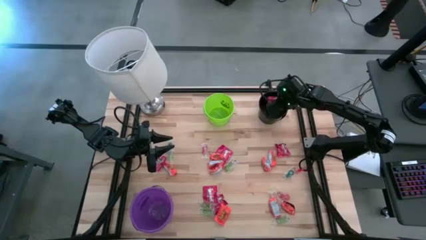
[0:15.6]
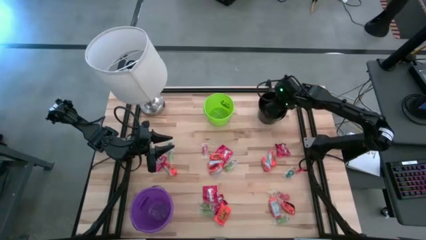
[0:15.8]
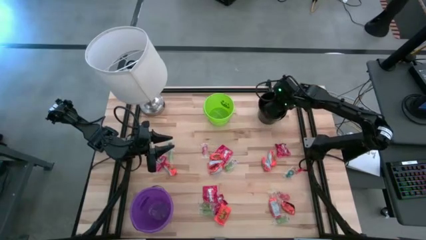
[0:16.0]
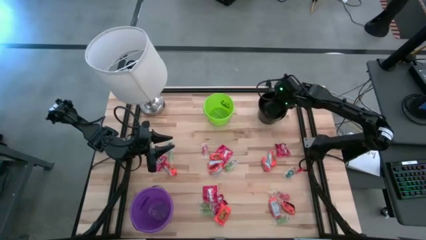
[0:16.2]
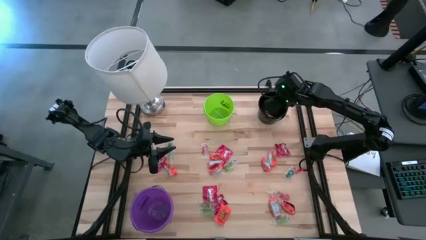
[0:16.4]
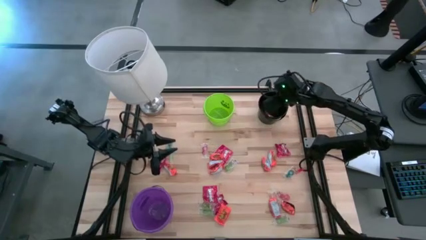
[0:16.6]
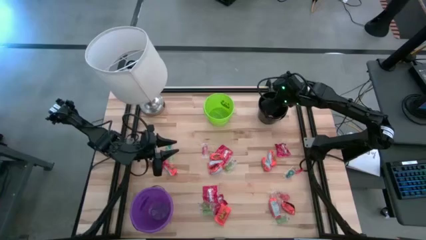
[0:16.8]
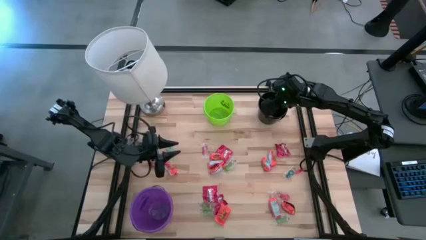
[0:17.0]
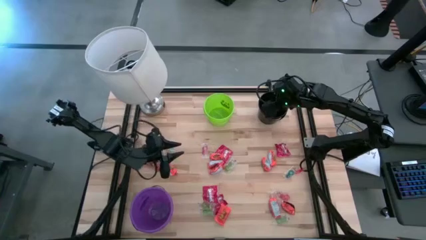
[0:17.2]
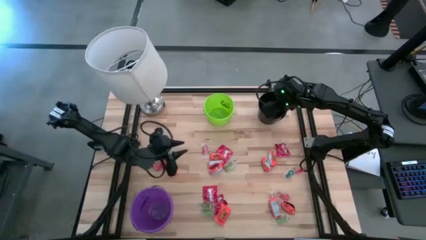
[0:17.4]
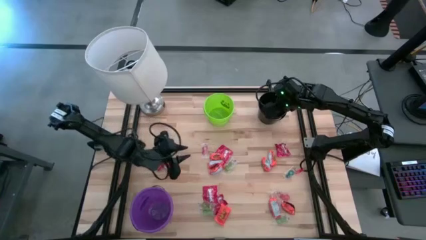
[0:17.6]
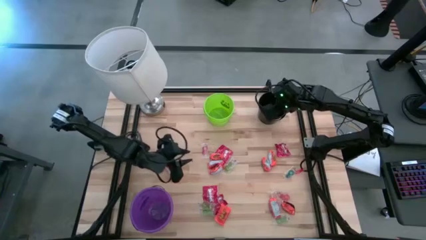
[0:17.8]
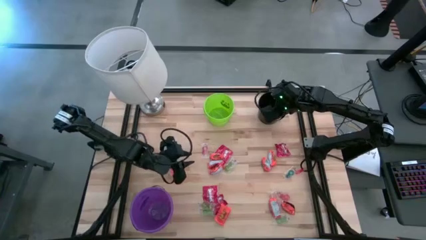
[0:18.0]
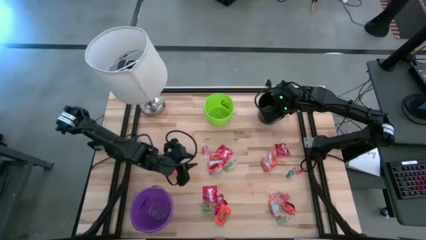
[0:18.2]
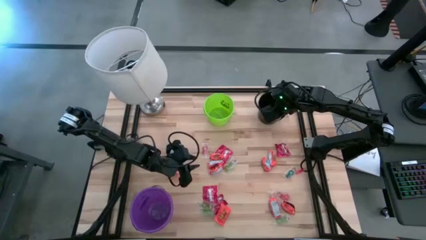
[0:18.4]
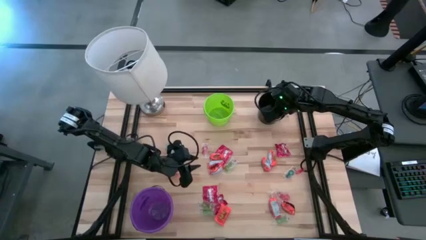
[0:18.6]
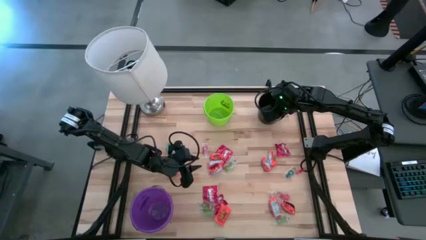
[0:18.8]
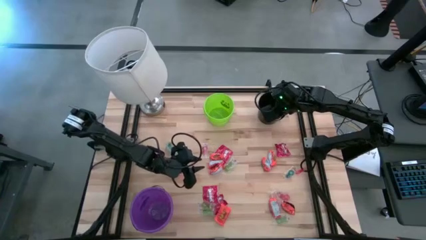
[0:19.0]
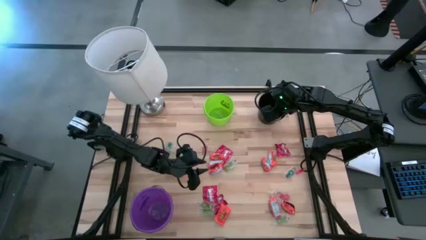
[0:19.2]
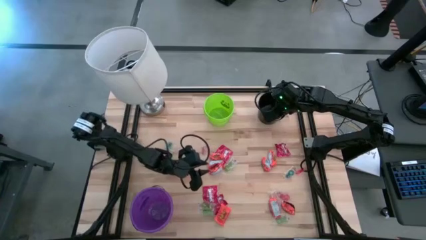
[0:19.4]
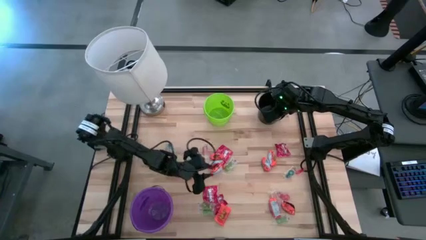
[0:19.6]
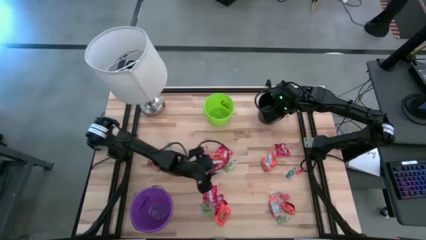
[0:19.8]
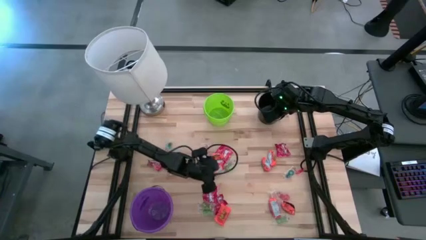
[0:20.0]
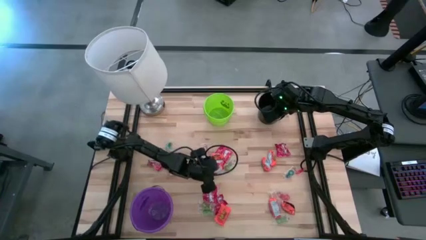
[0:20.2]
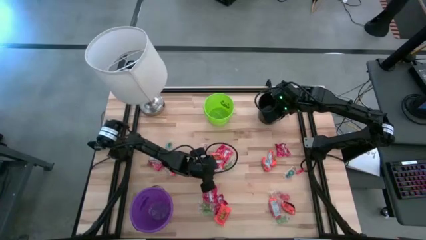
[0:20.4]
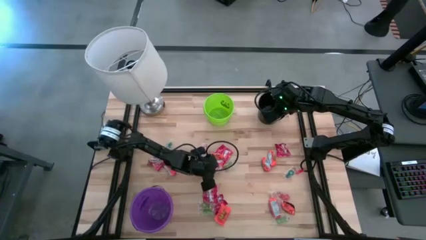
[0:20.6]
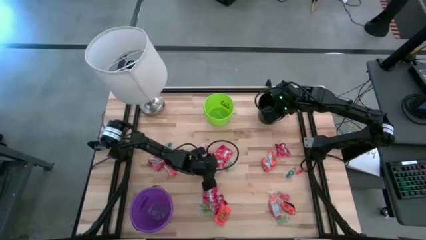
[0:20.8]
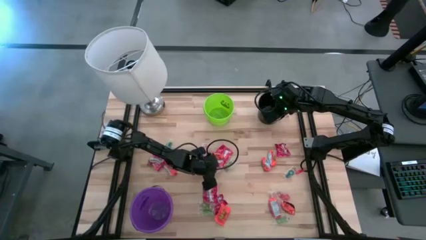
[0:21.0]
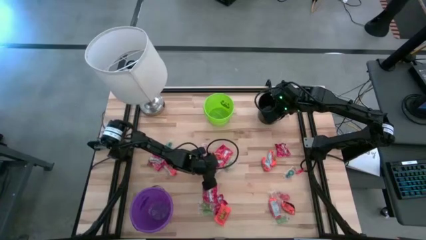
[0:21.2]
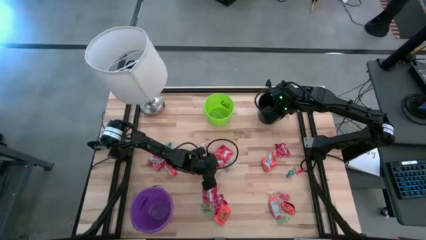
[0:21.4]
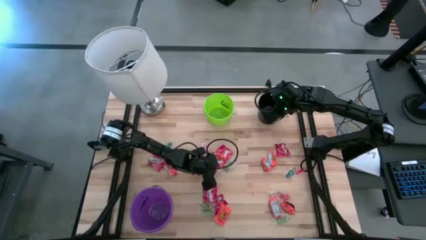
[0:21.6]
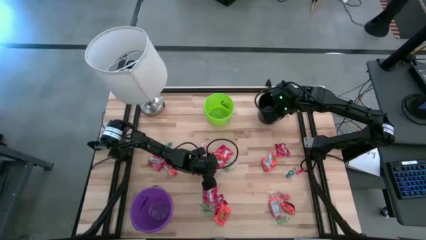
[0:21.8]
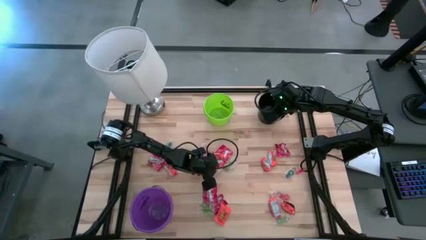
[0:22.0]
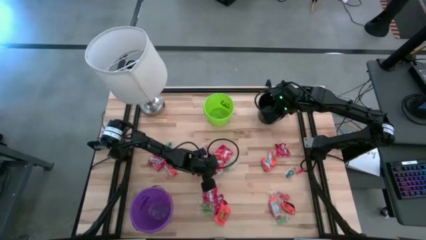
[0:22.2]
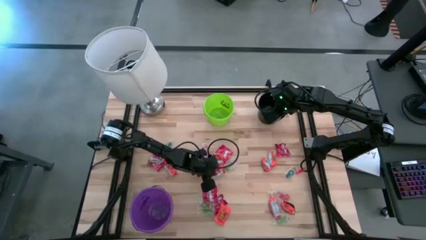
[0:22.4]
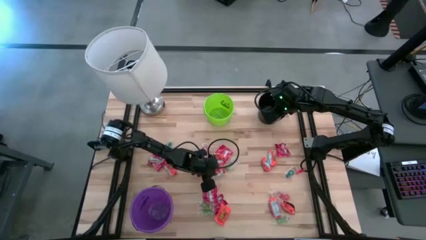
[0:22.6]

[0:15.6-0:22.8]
Task: Sort candy
Put the orange chocolate into the green bucket

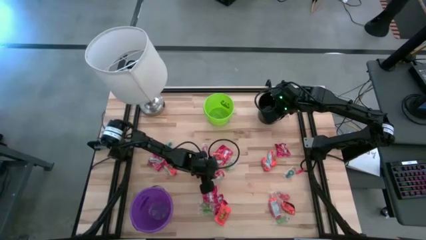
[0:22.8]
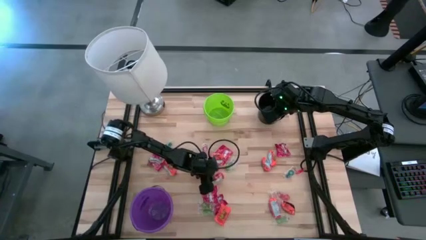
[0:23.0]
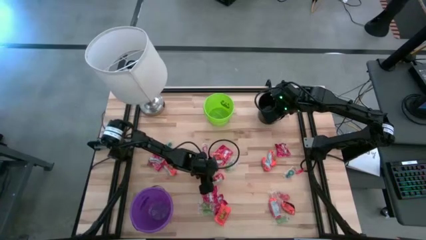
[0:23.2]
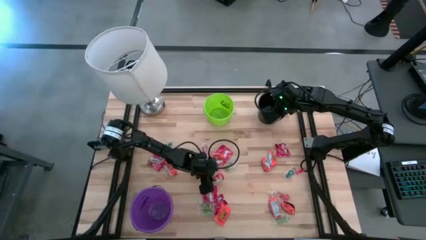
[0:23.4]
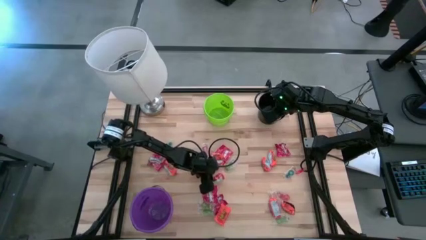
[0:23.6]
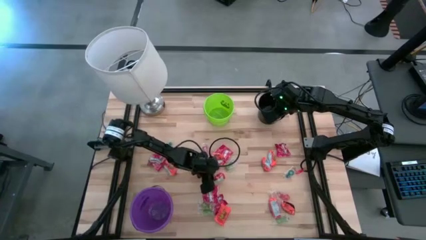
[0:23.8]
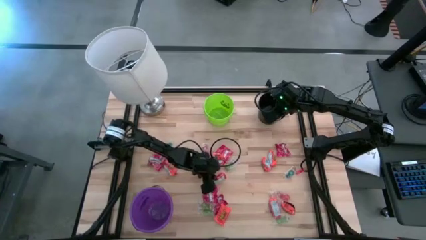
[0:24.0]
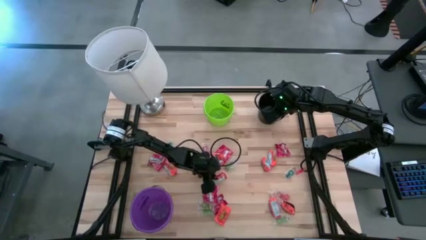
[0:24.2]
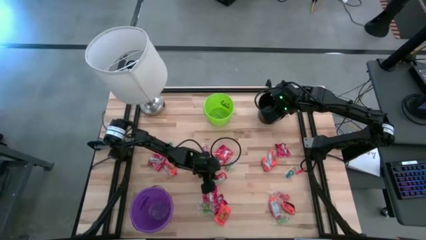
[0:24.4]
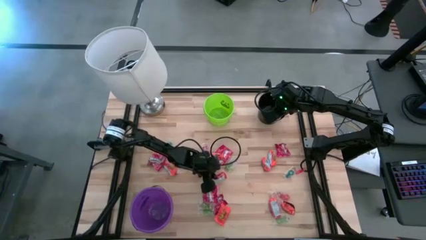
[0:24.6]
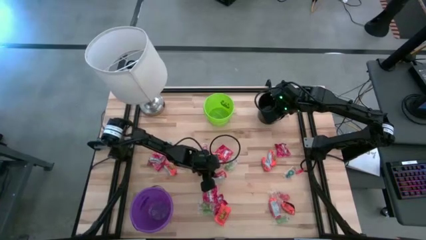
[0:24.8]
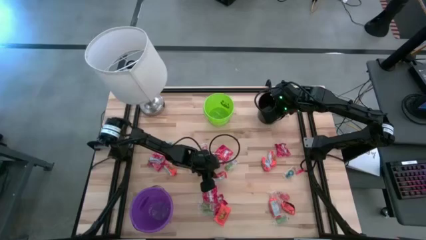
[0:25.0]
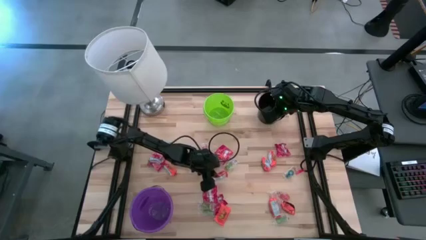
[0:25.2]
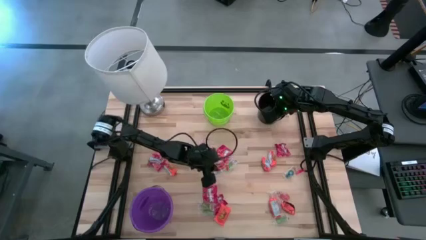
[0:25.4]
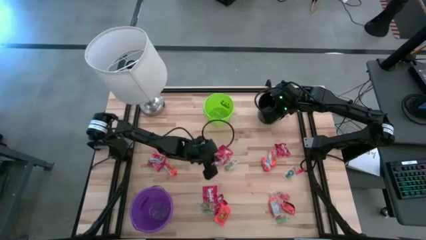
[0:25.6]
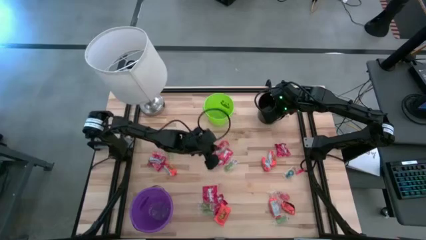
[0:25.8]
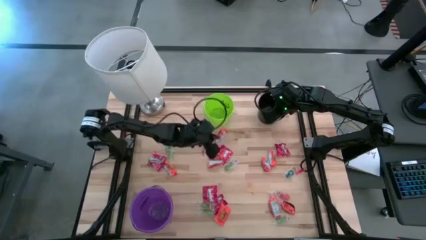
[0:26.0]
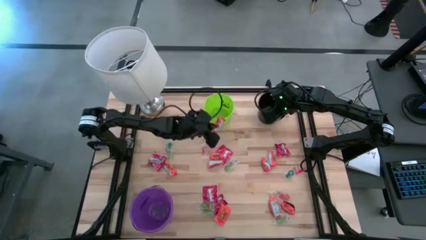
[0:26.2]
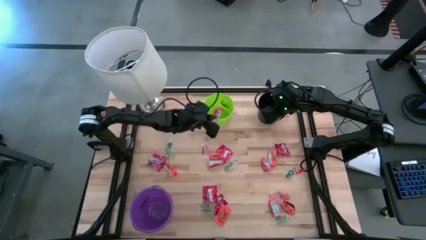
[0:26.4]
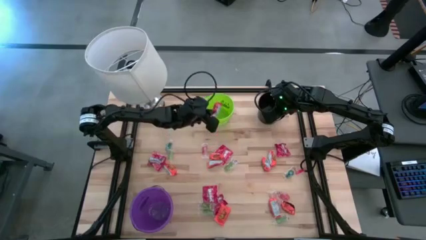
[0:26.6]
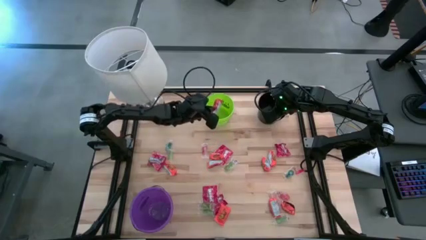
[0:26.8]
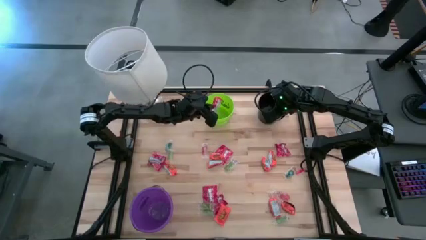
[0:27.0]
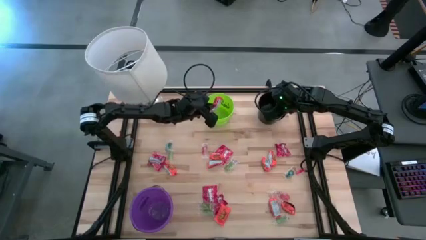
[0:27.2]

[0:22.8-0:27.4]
Put the orange chocolate into the green bucket

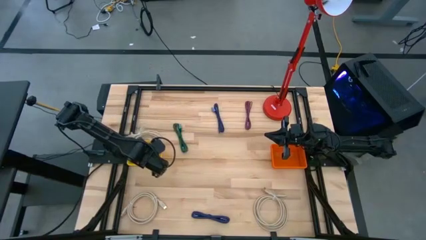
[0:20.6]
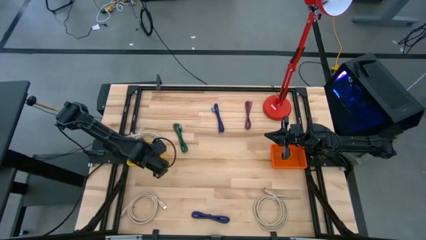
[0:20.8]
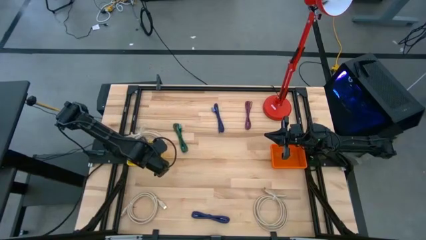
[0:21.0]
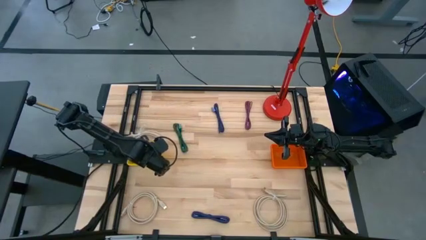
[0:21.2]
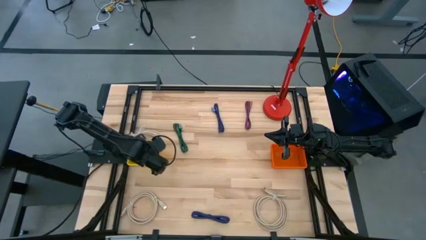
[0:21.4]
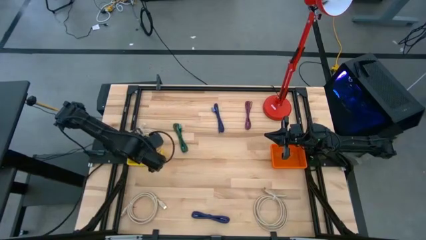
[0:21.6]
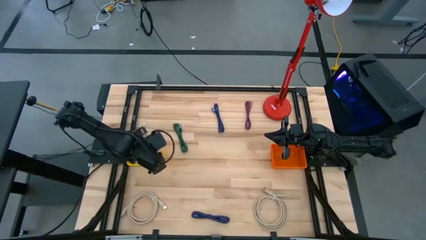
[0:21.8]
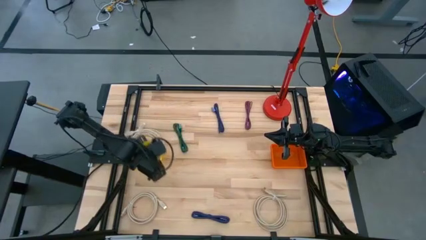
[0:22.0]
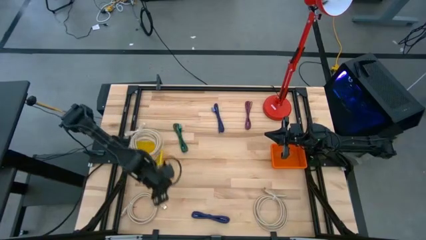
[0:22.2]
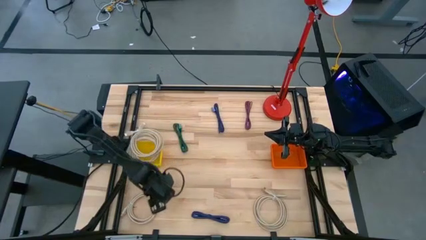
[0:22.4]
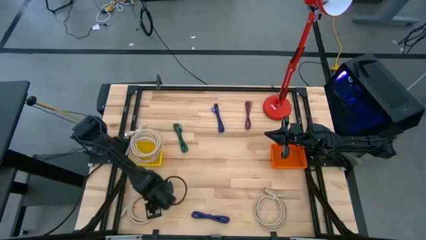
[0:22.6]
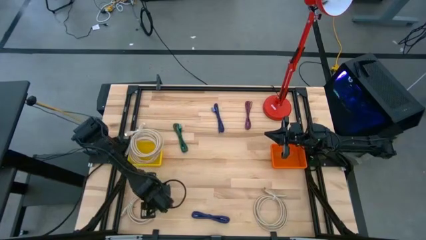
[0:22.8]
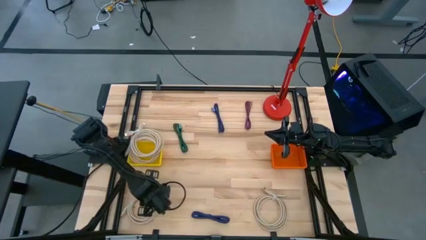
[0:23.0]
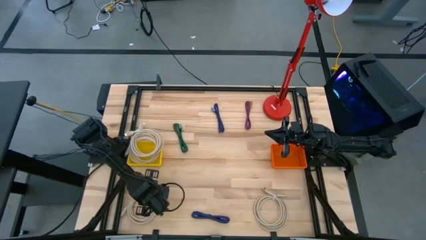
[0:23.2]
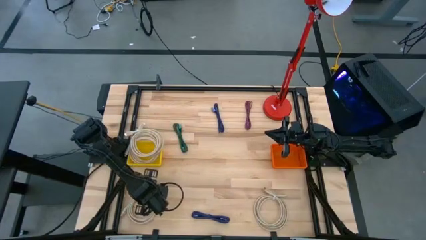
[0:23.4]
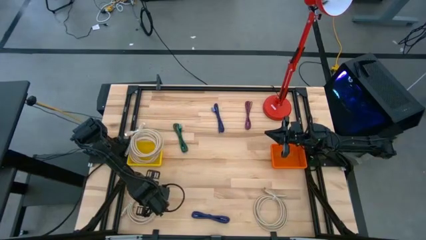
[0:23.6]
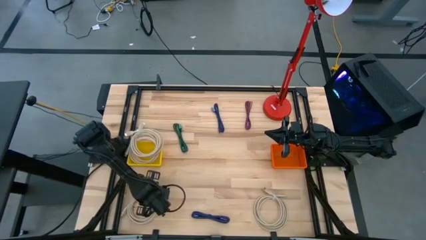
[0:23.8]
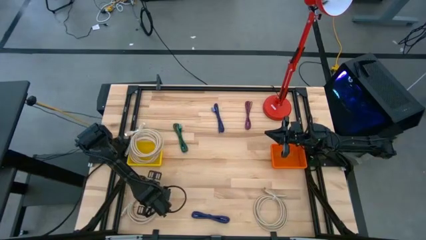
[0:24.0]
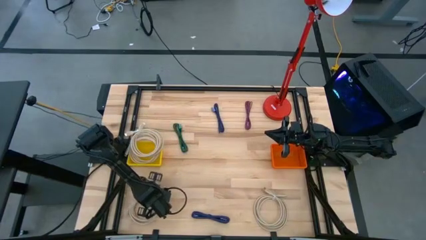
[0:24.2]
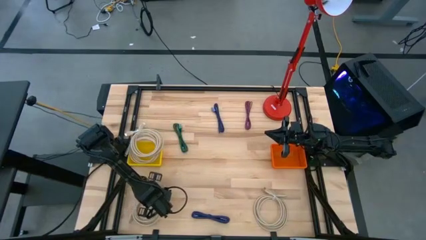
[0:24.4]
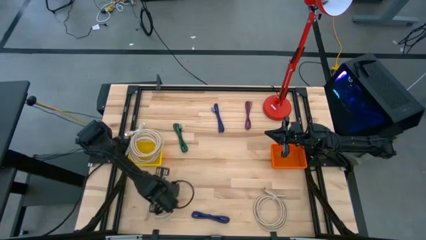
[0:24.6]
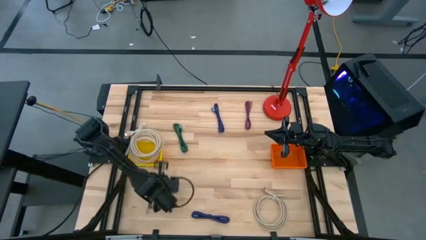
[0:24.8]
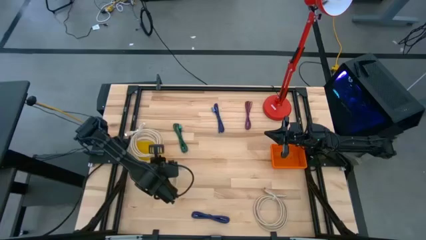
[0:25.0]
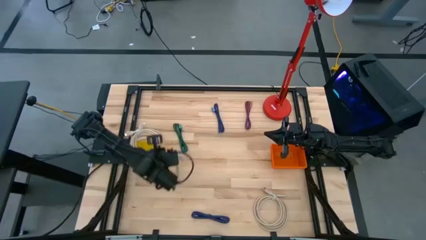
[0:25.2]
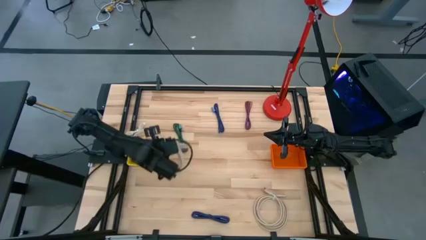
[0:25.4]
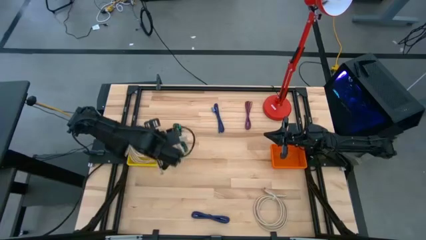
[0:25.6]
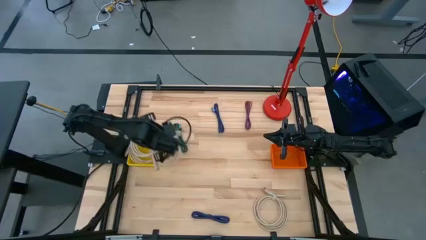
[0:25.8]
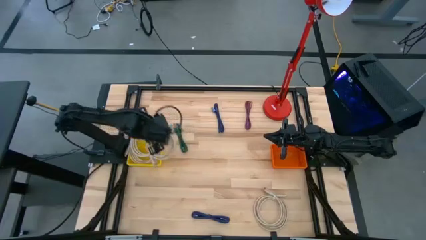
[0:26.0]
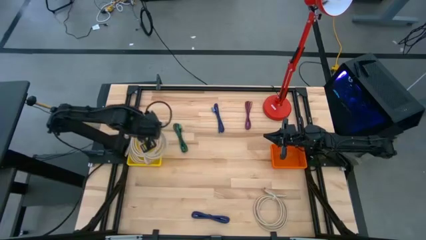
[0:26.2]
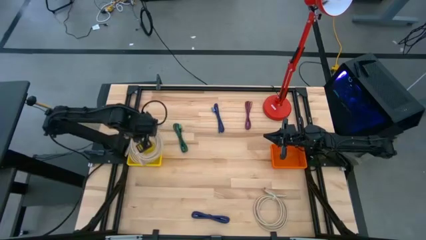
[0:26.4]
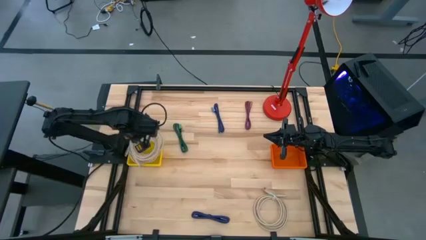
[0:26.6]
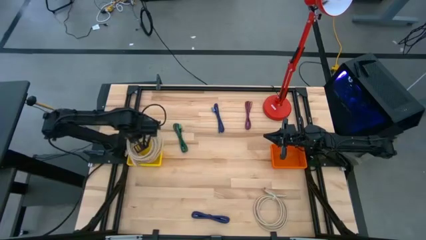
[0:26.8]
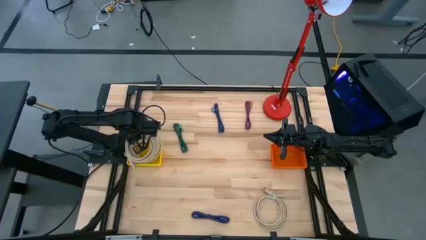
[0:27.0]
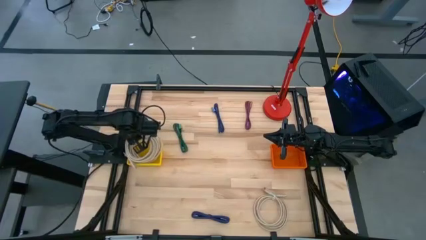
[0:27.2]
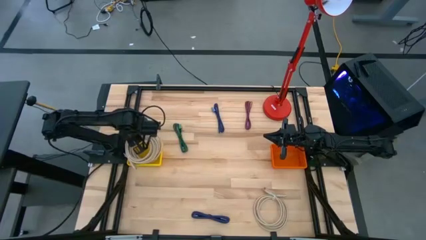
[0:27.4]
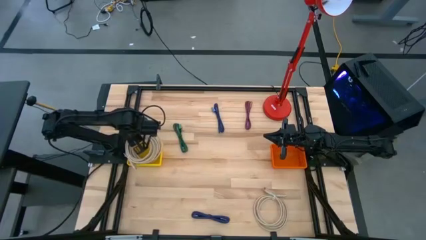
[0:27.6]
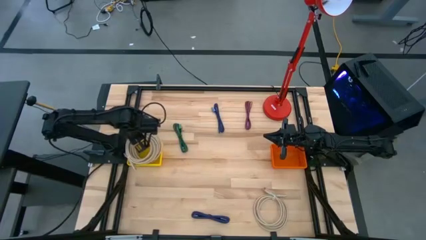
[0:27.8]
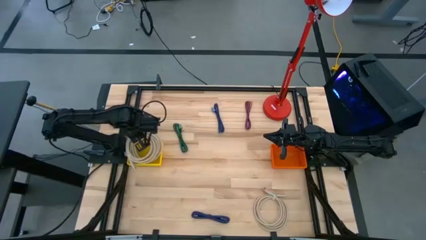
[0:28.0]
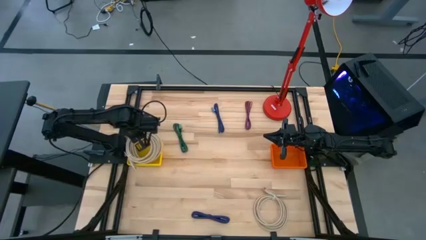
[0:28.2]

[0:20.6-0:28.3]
Task: Pick & Place USB Port
Put the brown HDMI cable into the yellow basket
